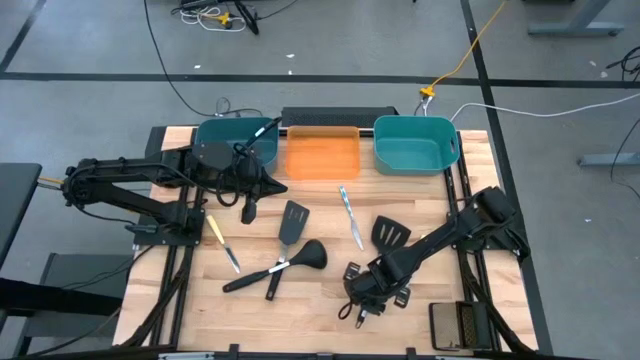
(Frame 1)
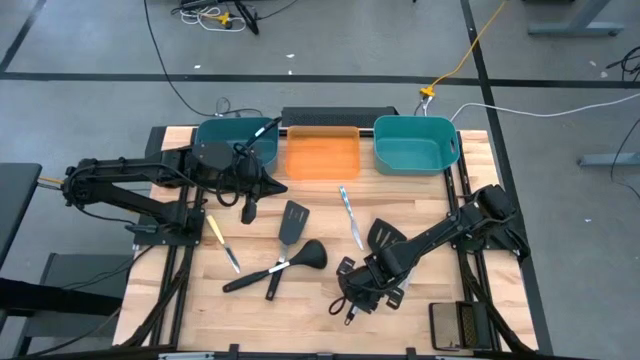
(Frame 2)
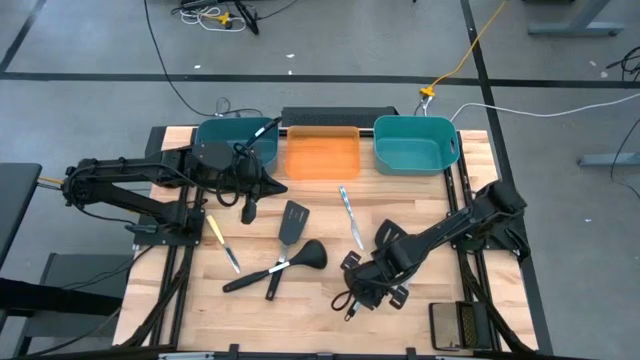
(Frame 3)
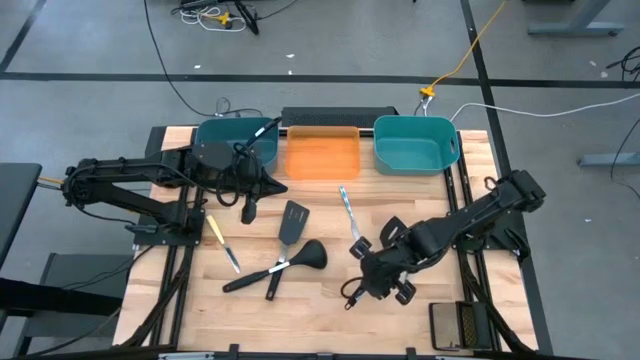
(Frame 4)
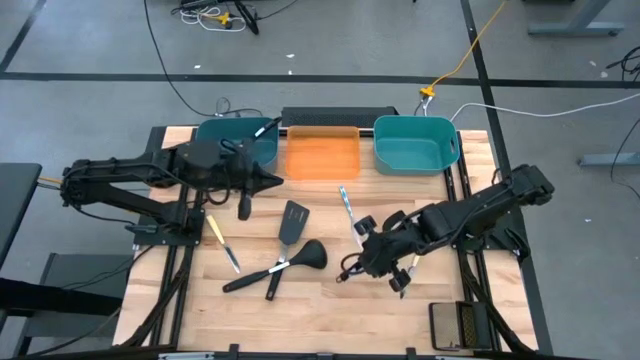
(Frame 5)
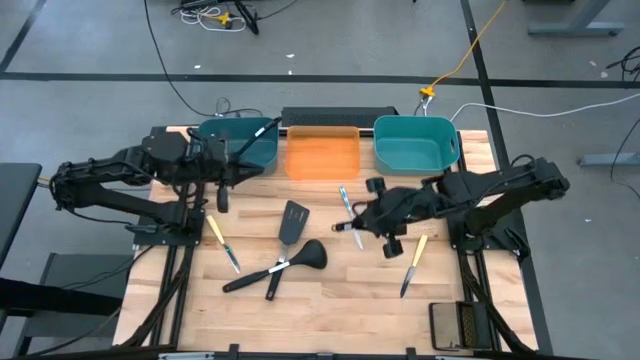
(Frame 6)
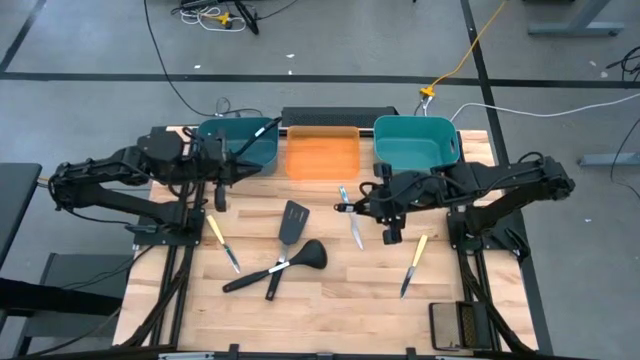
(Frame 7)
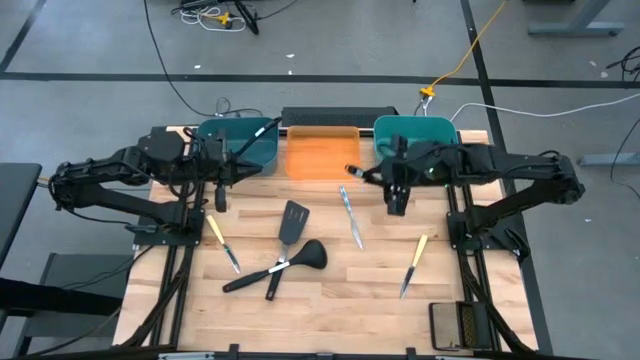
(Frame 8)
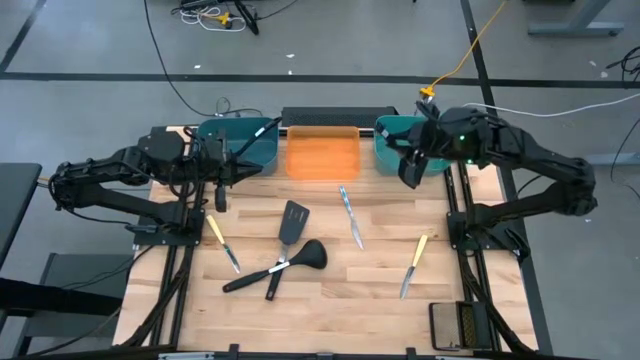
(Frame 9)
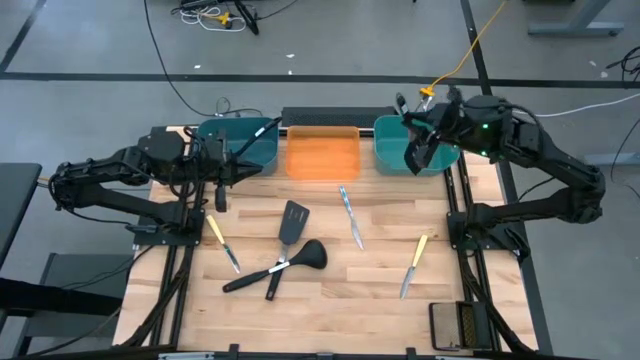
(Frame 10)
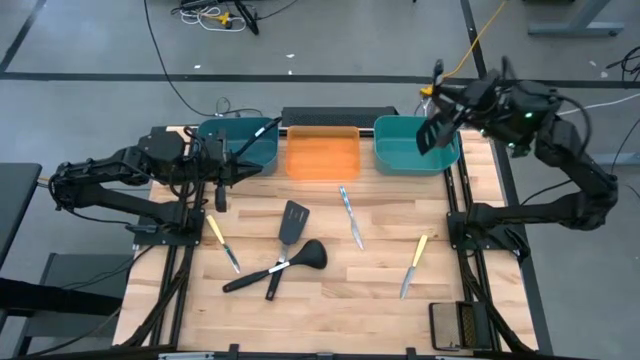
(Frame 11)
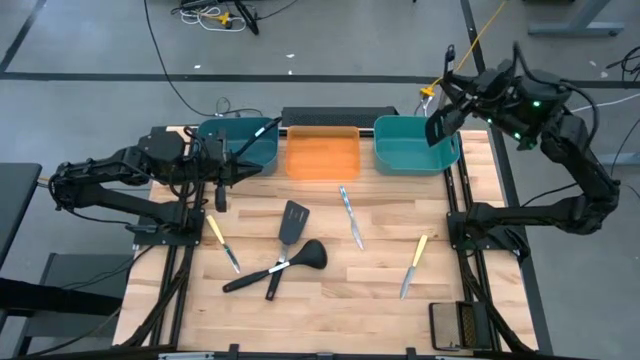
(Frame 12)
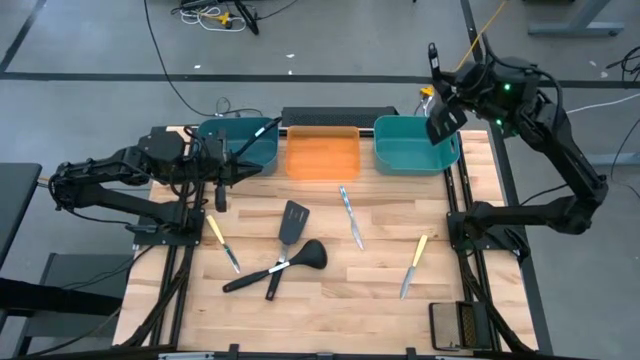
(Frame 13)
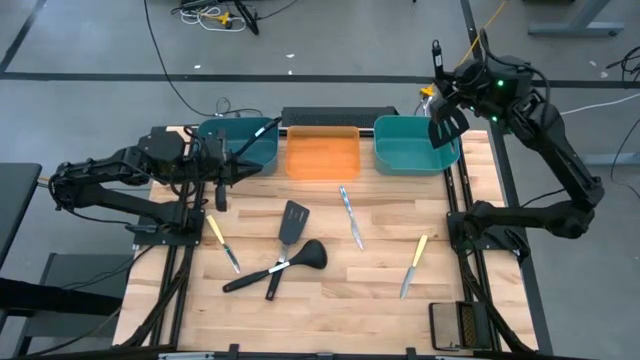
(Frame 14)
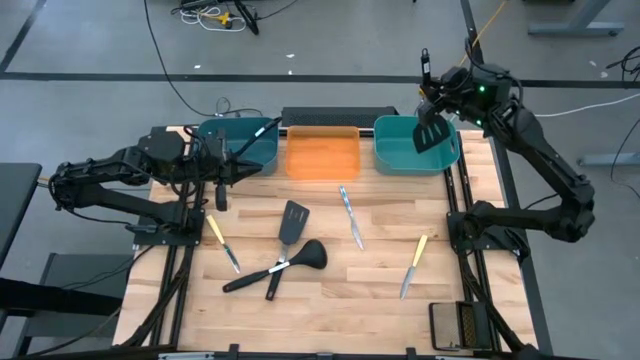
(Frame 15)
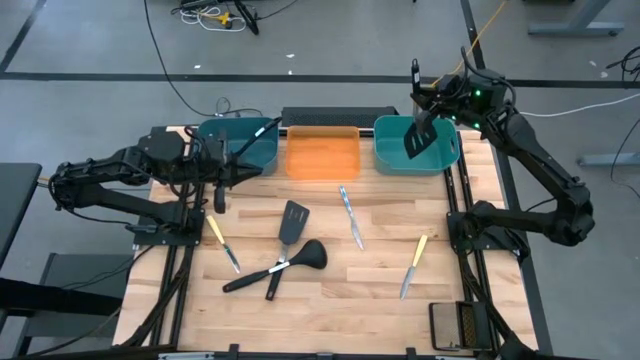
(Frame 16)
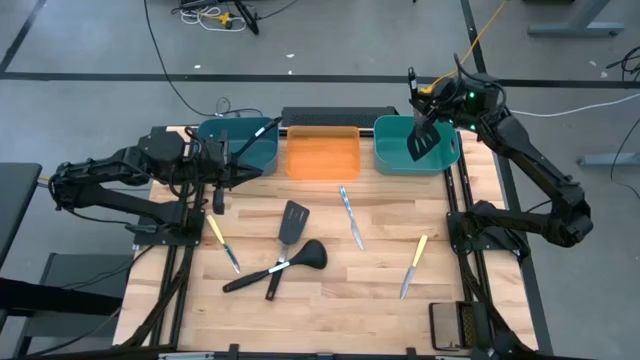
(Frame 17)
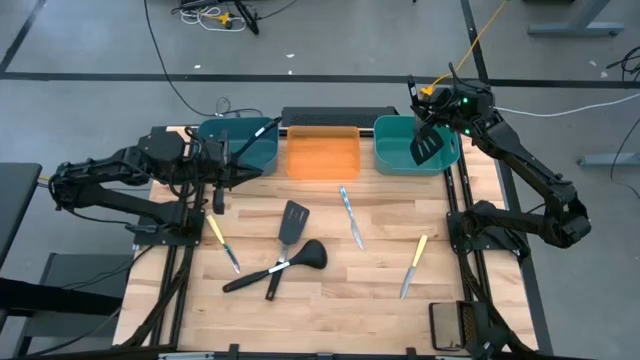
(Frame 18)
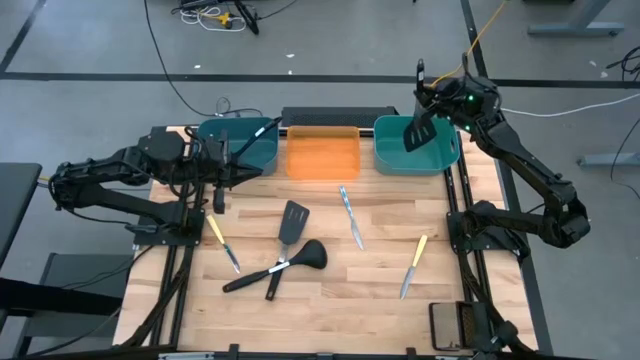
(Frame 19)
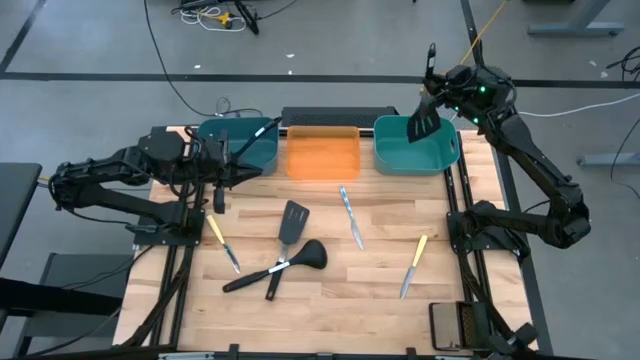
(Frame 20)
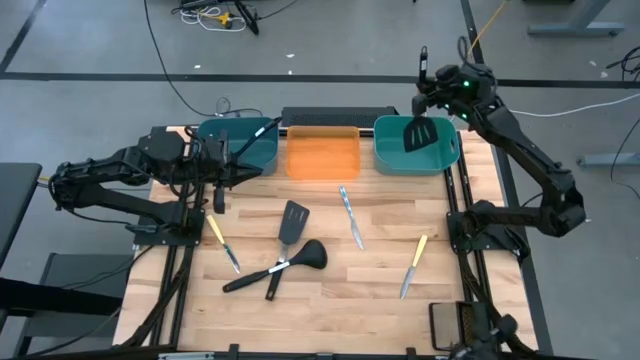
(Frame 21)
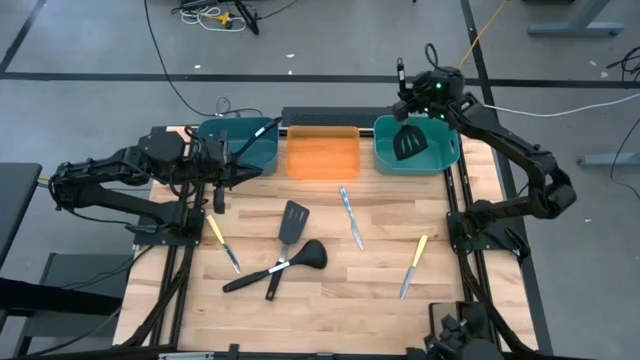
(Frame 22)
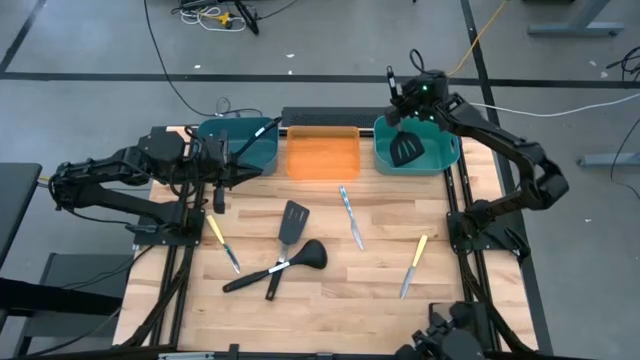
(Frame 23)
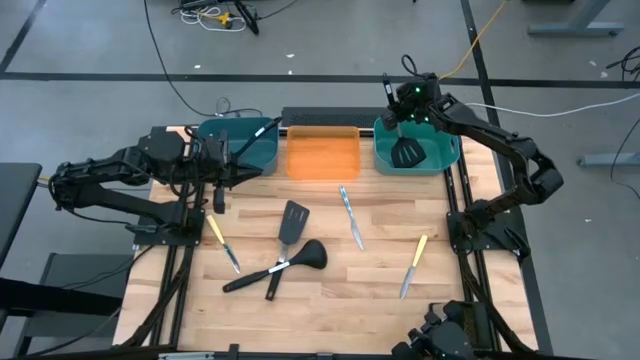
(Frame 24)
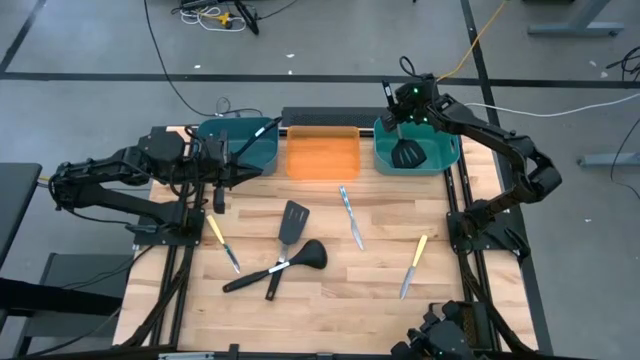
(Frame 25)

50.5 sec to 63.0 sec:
Task: Pick & Place Kitchen Items
Put the black spatula into the green bin

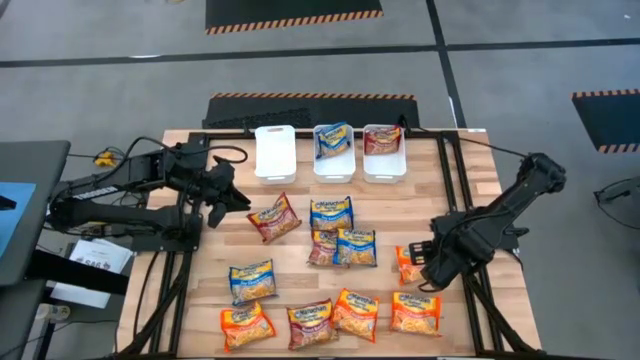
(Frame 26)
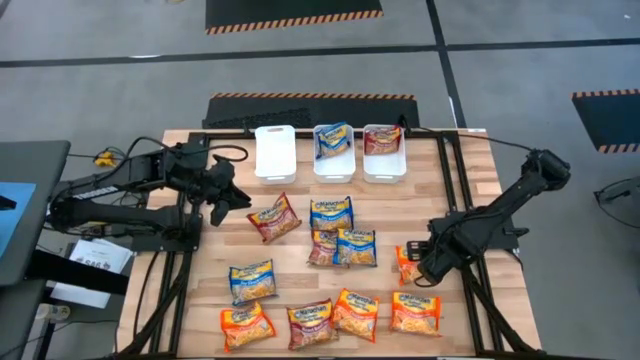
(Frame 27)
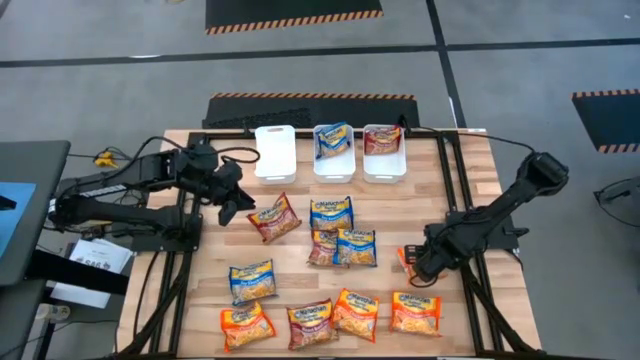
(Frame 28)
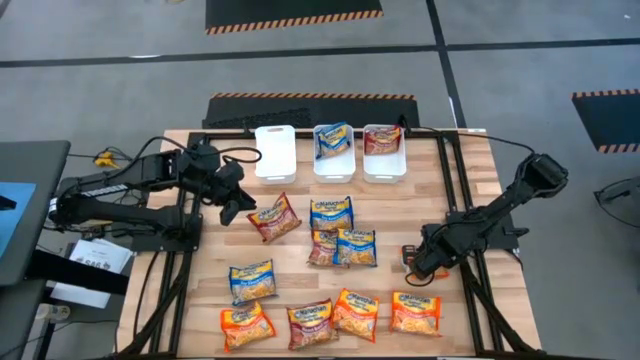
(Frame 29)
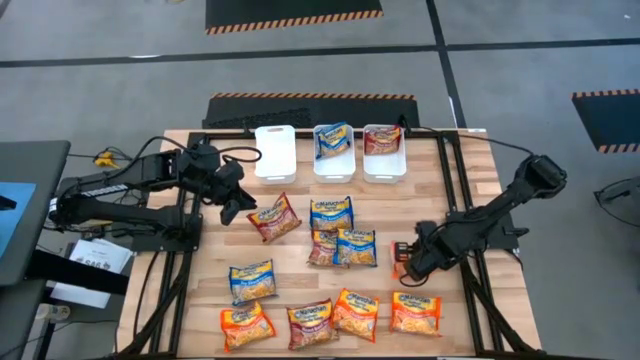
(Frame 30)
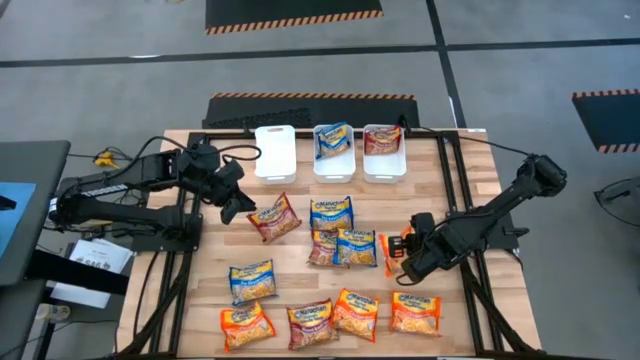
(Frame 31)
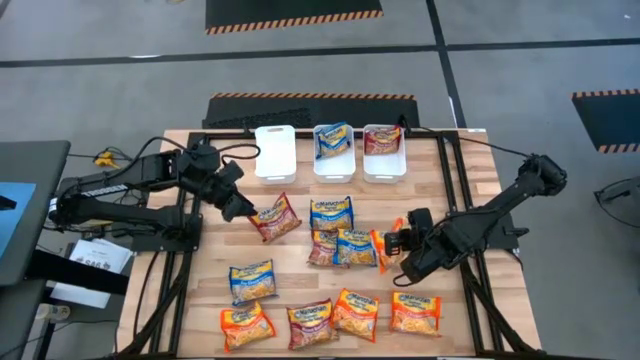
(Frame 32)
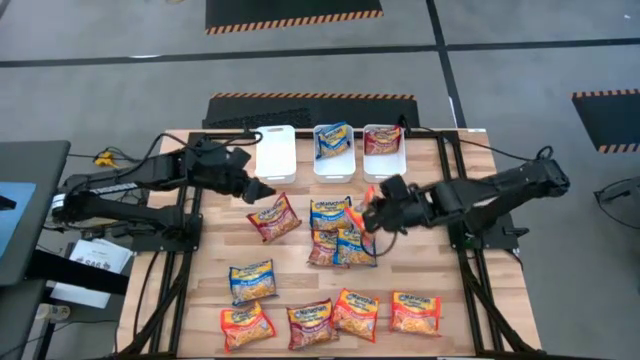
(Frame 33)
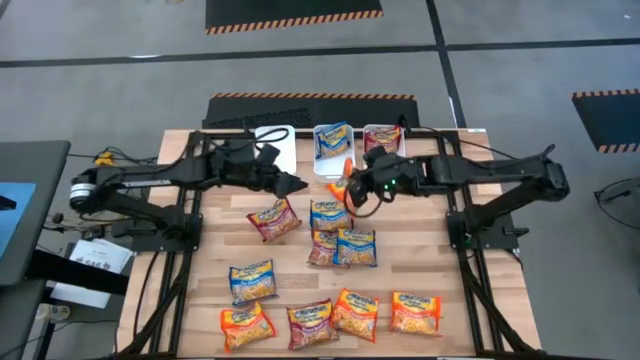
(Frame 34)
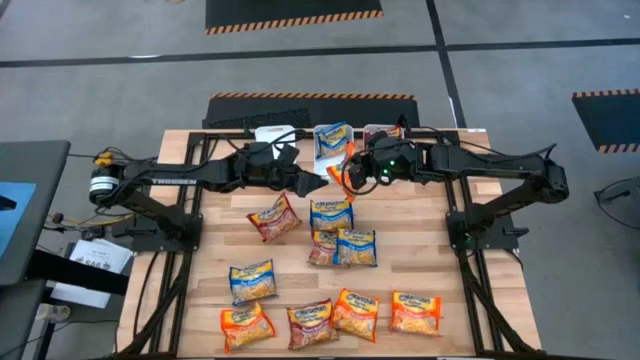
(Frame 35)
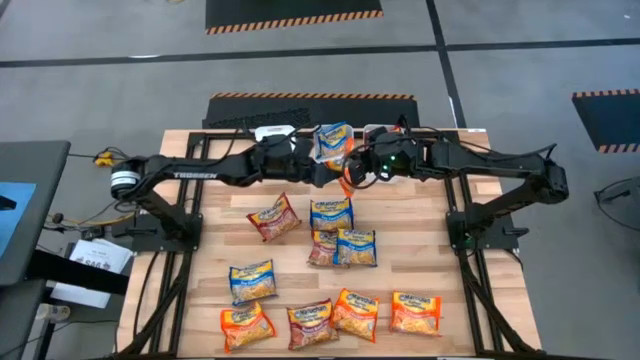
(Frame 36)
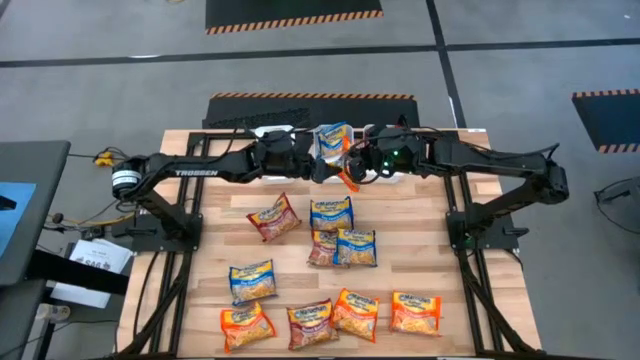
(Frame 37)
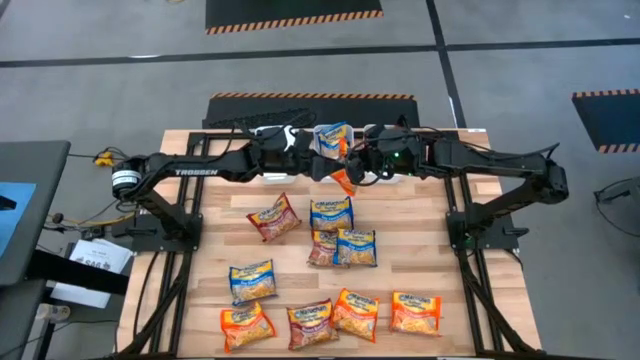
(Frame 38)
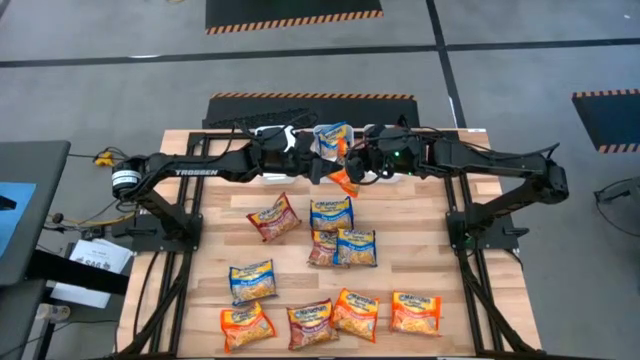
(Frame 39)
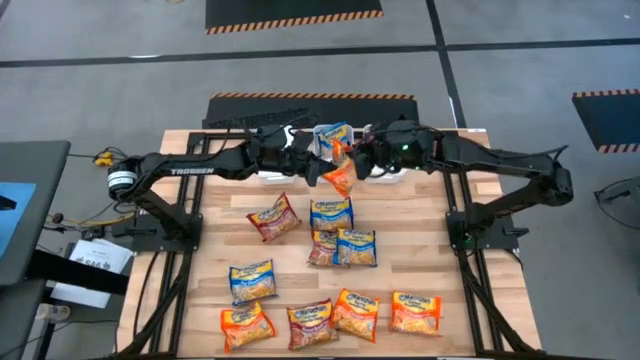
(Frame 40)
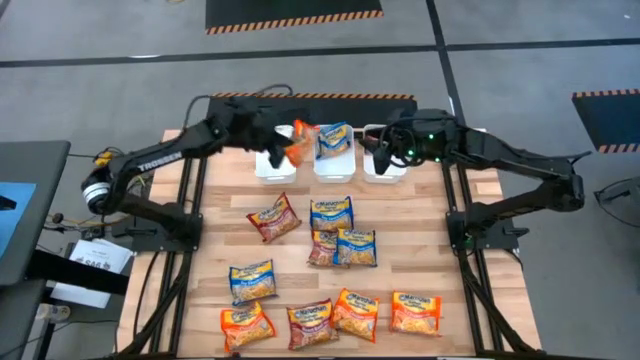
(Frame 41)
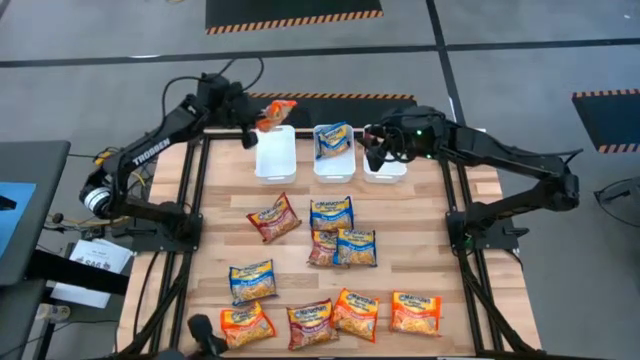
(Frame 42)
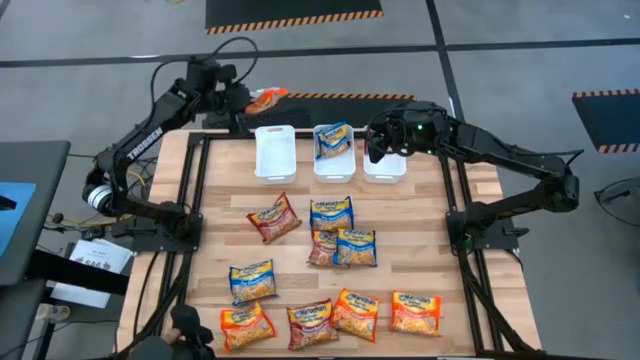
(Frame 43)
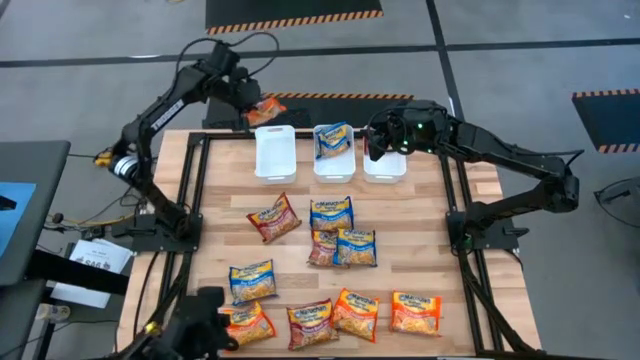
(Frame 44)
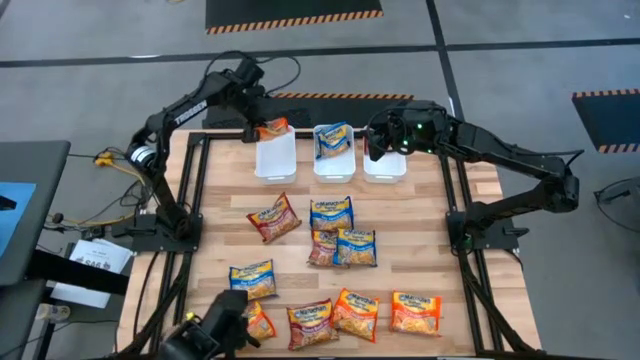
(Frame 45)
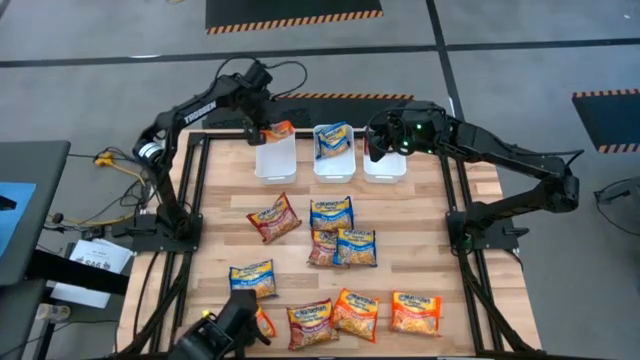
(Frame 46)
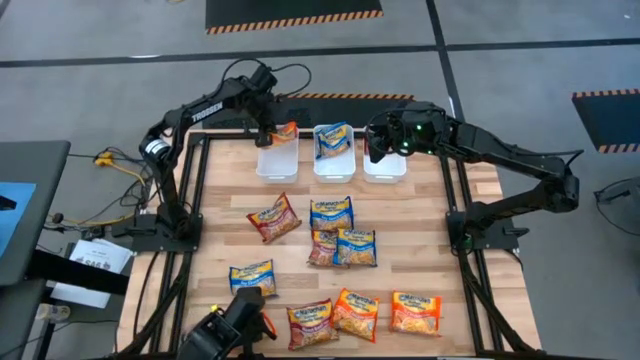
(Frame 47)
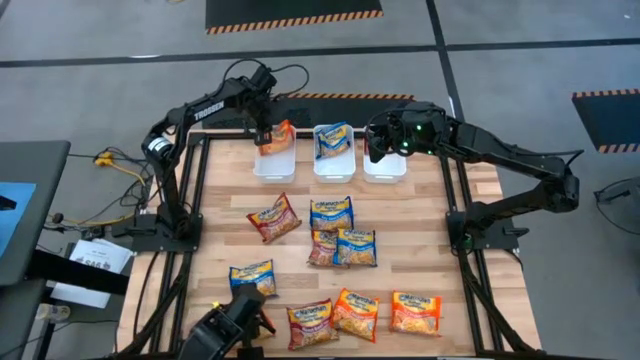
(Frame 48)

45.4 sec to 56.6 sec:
Task: Sort Maruchan noodles
Put the top orange noodle soup pack into the left white bin
